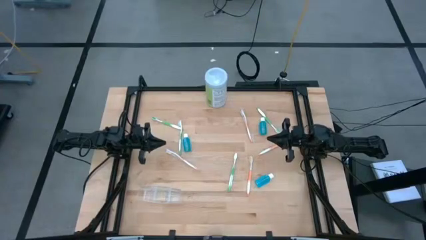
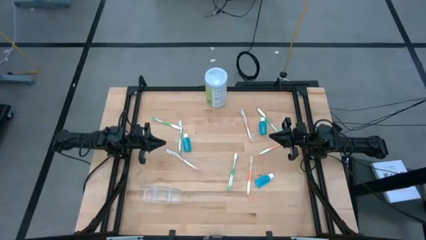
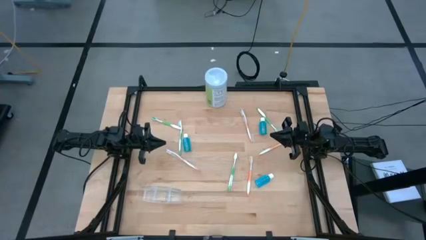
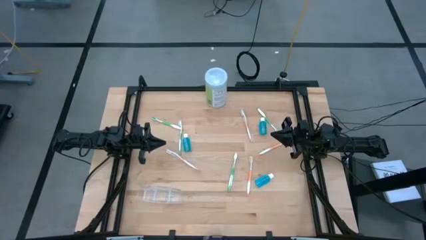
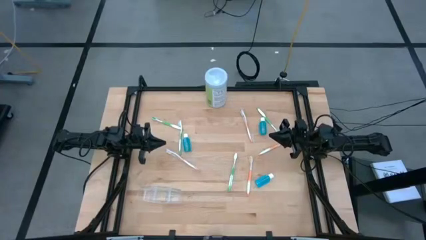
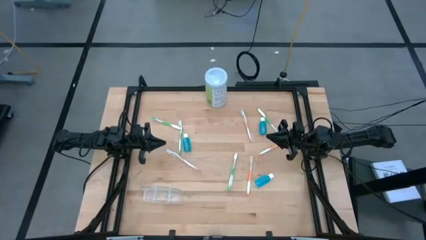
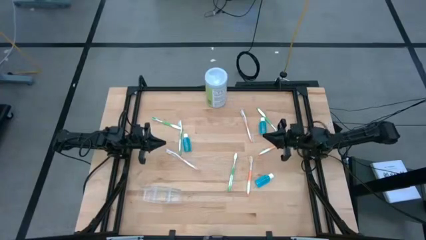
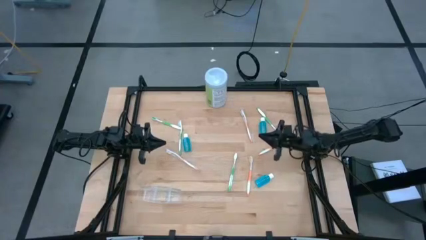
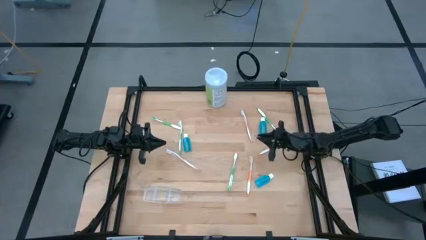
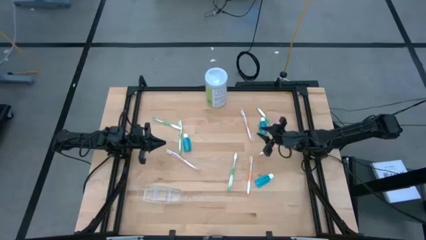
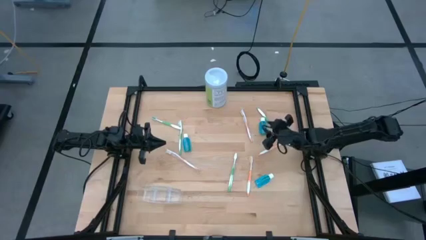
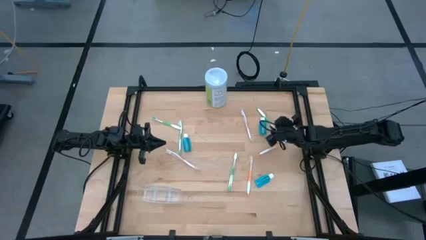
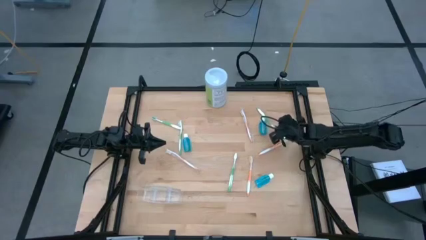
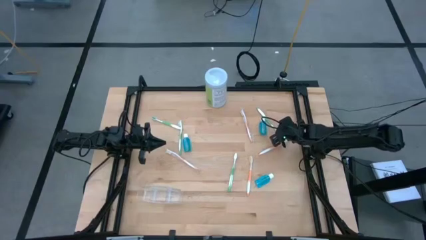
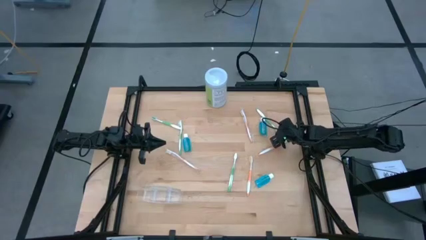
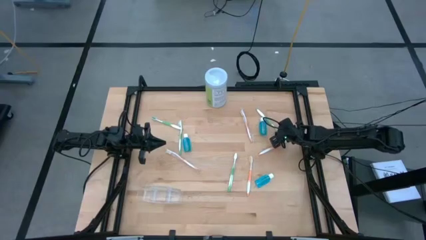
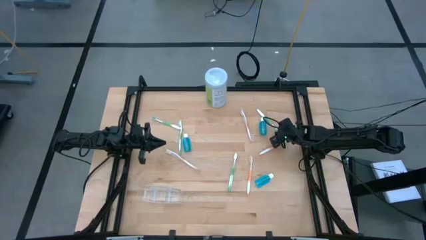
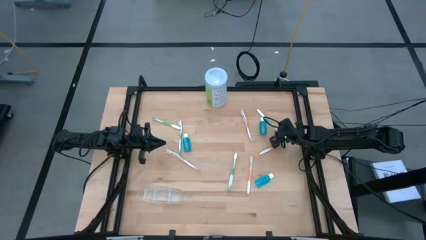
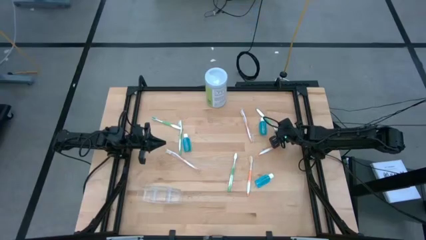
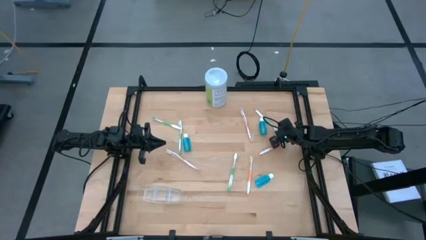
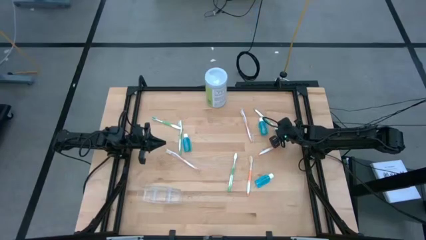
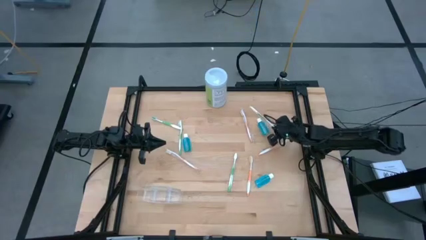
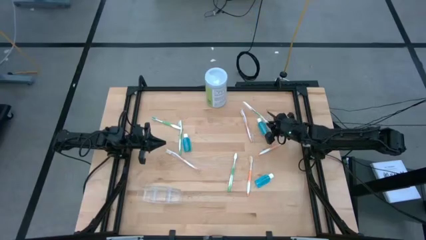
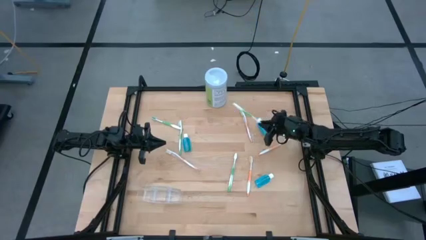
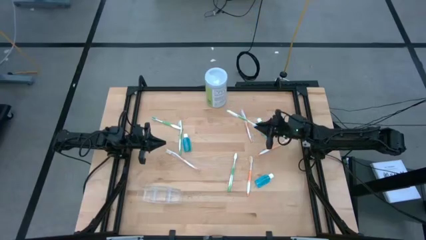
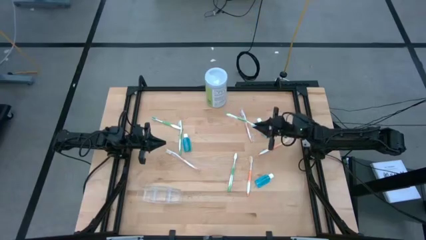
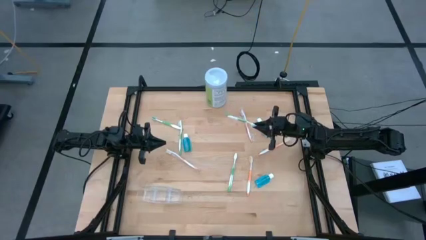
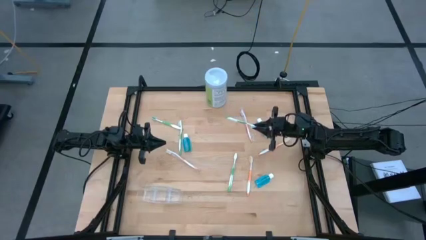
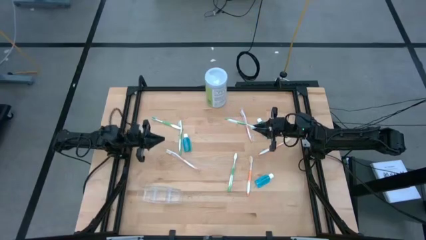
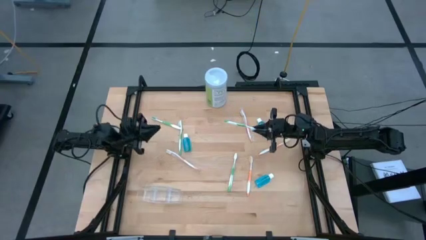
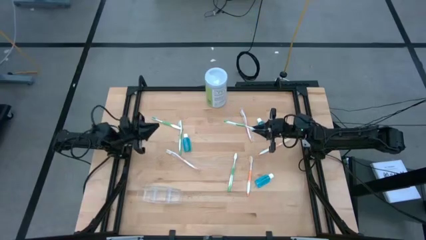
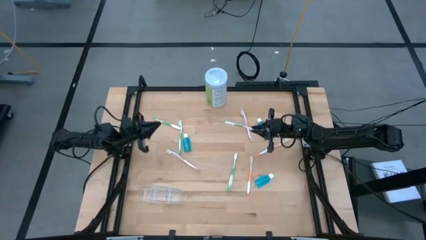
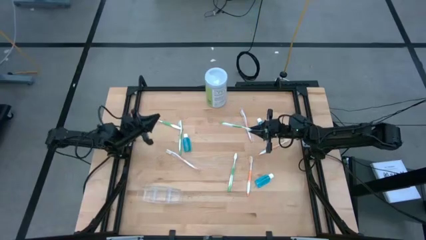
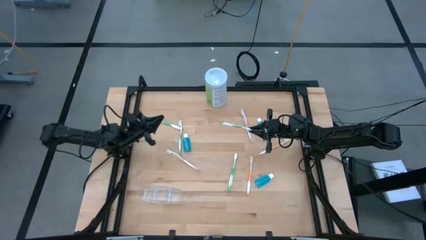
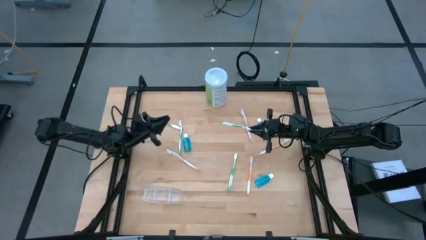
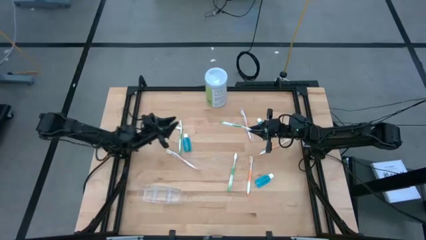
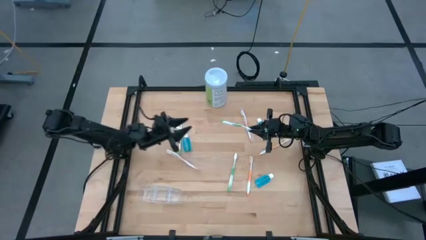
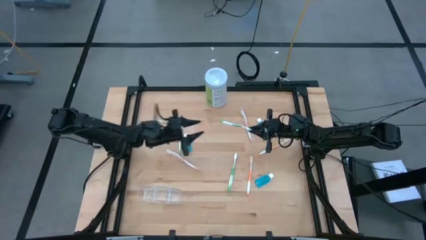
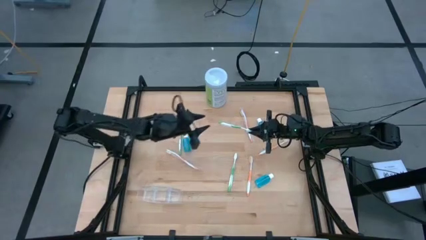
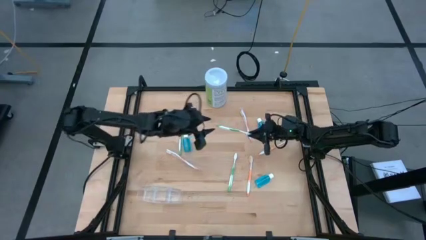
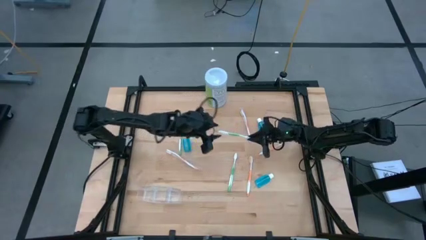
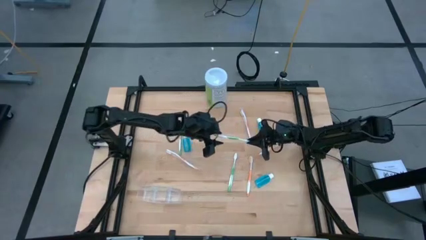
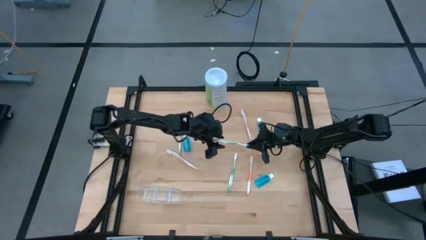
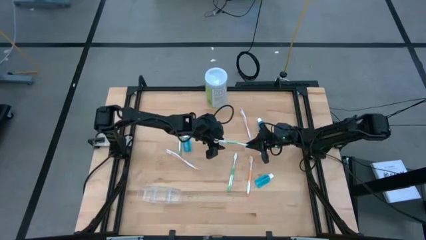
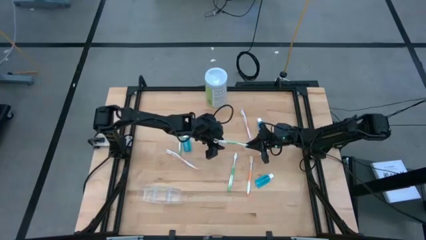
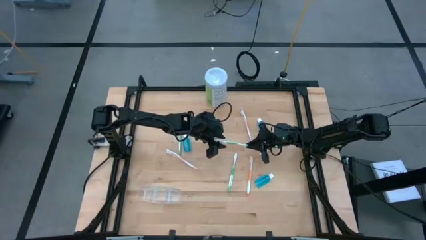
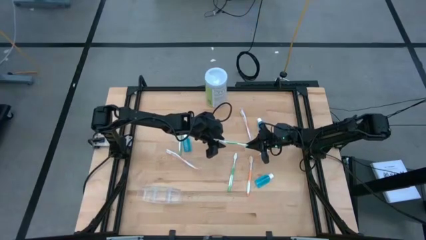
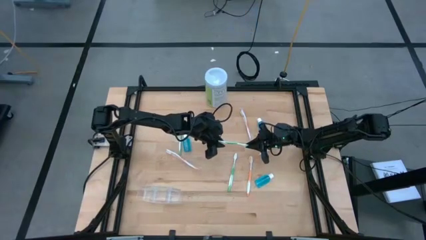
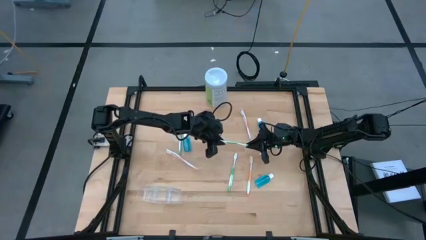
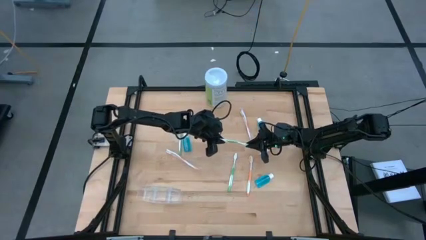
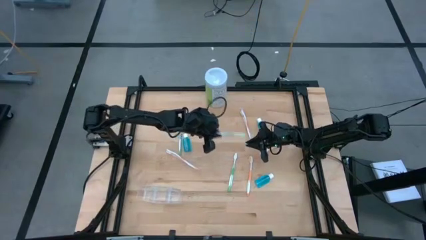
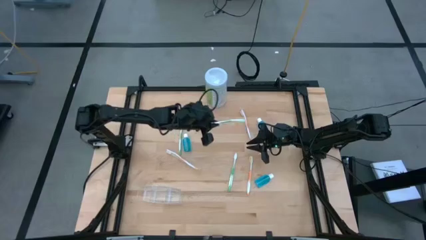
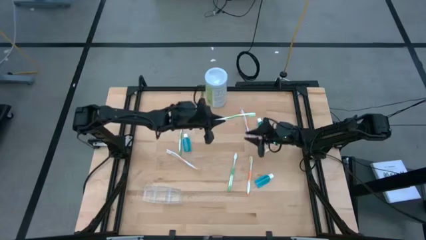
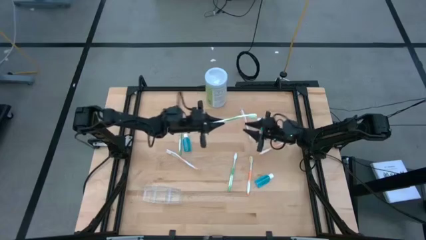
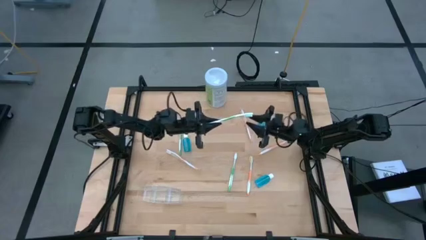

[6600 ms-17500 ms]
Task: Pick & Place toothbrushing station
Put the green toothbrush into the transparent organizer
